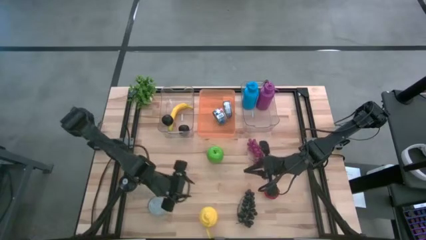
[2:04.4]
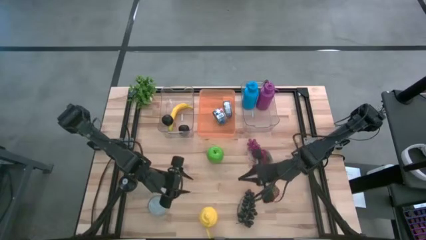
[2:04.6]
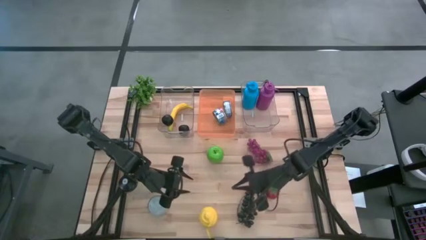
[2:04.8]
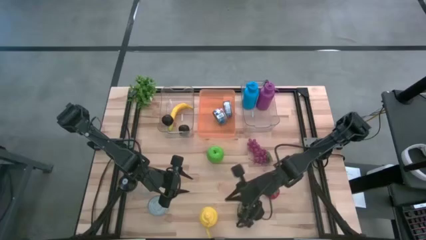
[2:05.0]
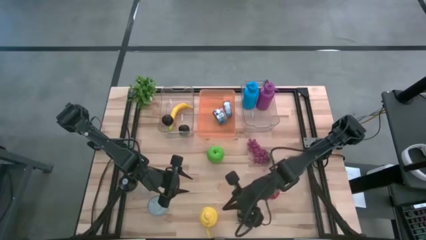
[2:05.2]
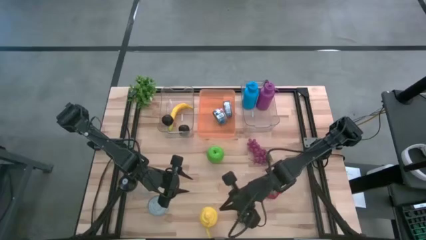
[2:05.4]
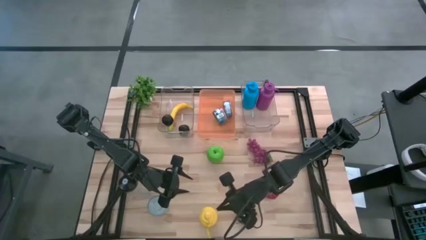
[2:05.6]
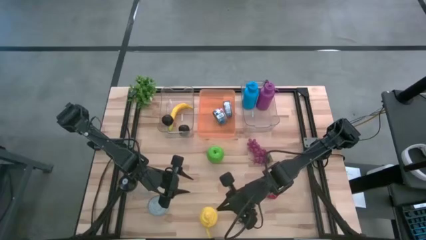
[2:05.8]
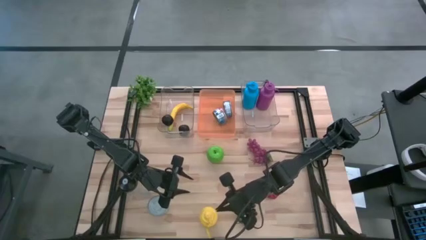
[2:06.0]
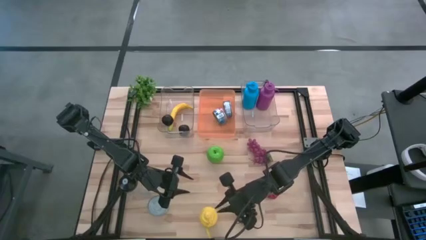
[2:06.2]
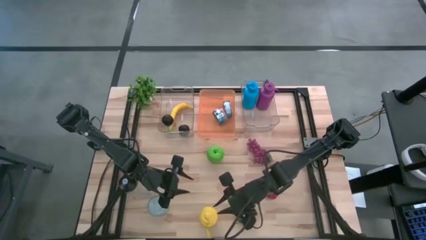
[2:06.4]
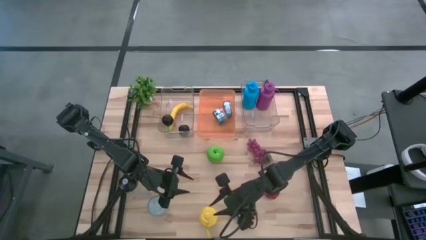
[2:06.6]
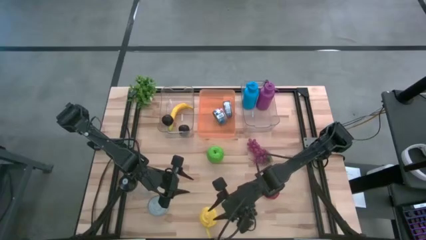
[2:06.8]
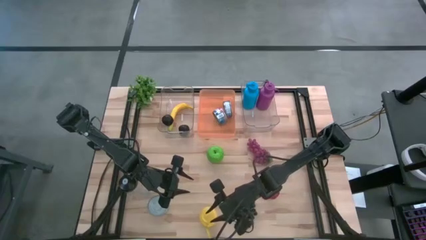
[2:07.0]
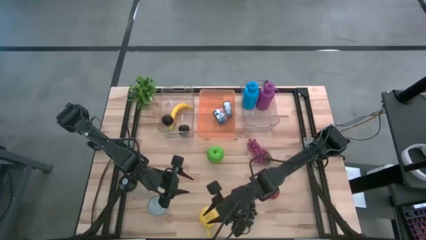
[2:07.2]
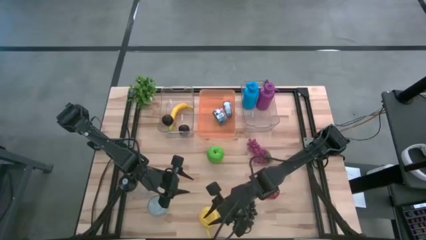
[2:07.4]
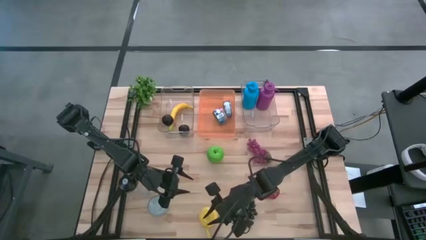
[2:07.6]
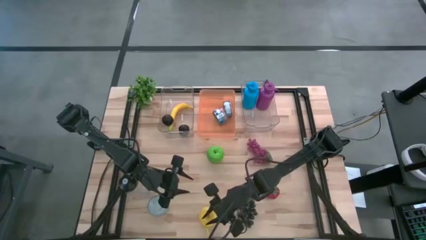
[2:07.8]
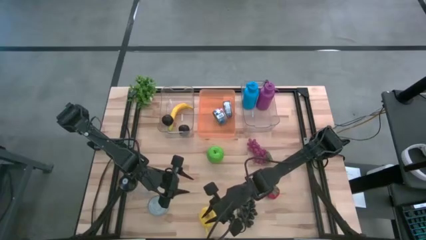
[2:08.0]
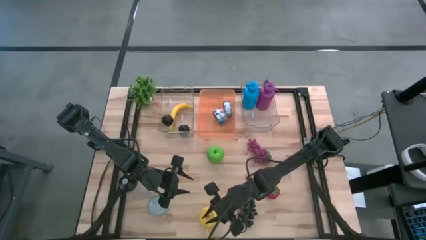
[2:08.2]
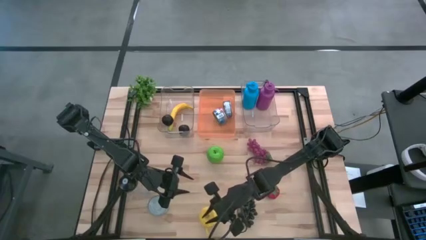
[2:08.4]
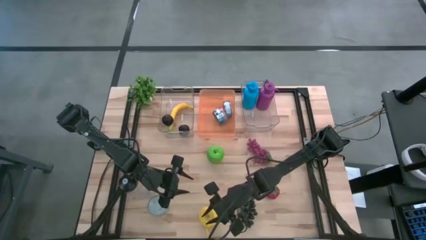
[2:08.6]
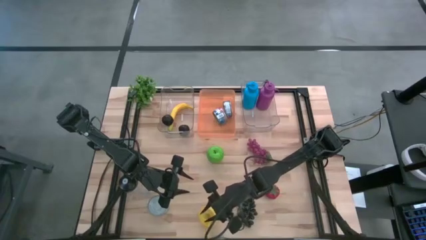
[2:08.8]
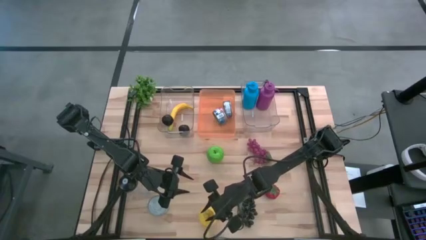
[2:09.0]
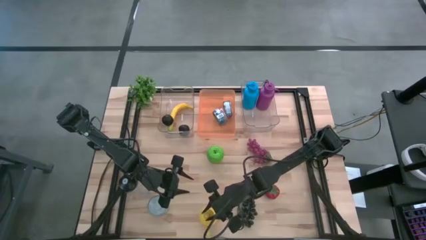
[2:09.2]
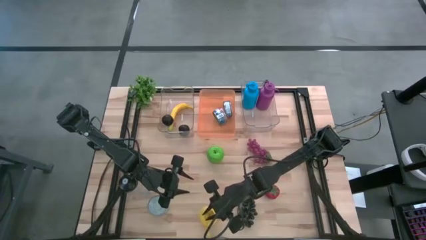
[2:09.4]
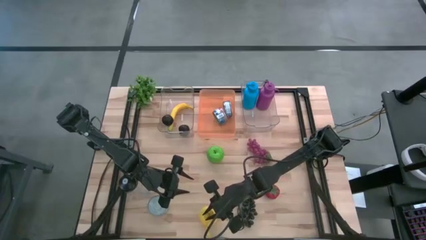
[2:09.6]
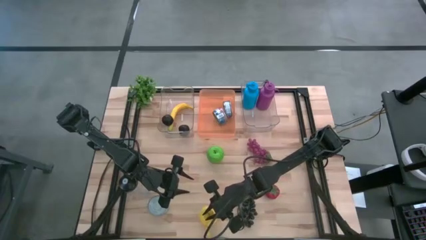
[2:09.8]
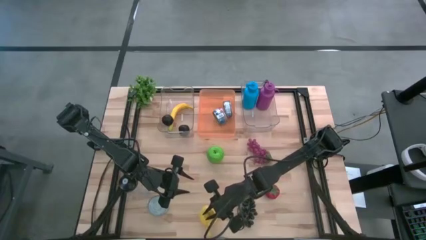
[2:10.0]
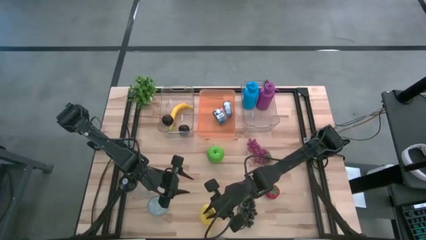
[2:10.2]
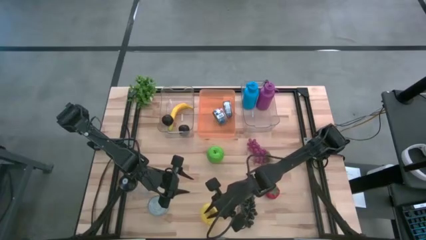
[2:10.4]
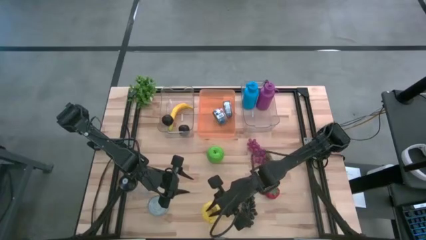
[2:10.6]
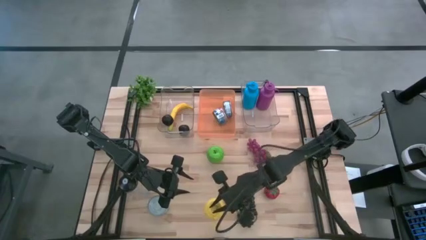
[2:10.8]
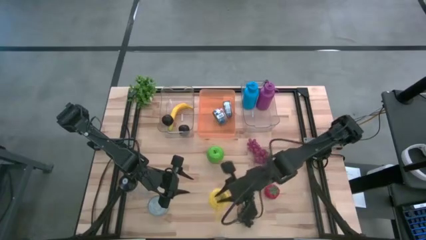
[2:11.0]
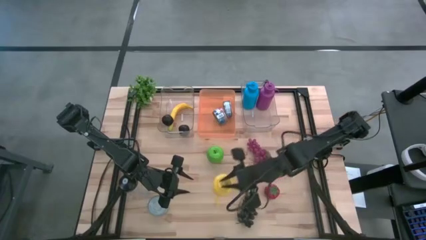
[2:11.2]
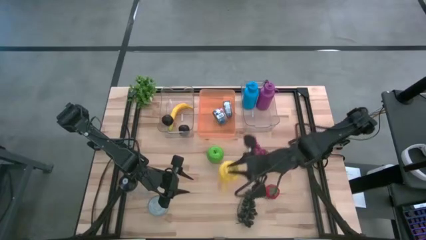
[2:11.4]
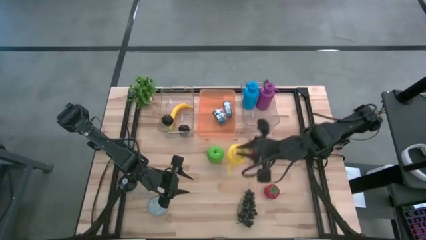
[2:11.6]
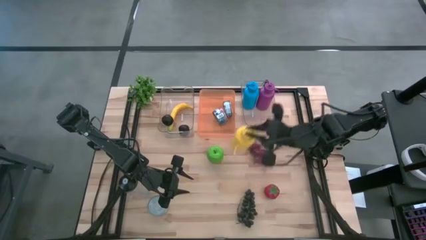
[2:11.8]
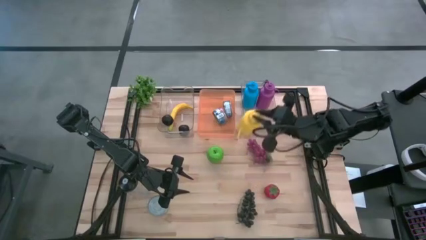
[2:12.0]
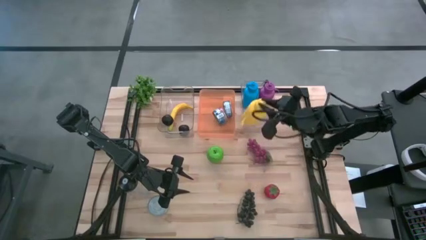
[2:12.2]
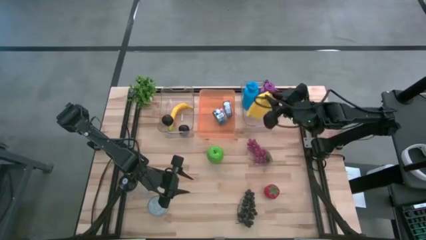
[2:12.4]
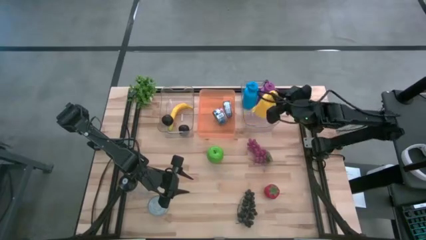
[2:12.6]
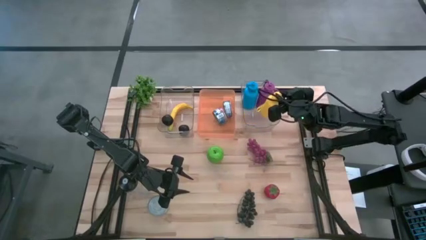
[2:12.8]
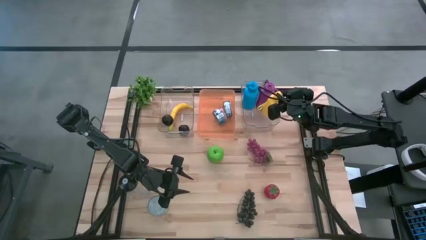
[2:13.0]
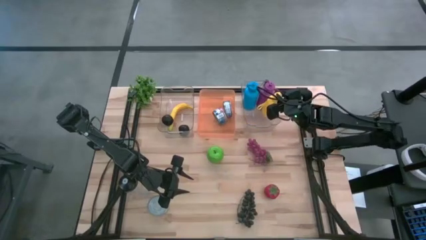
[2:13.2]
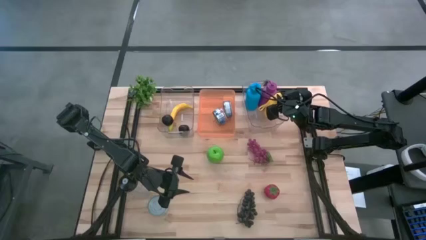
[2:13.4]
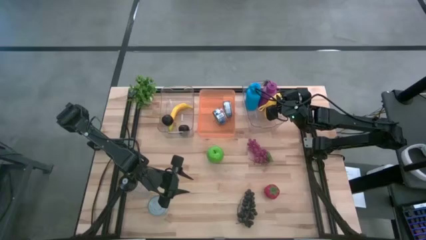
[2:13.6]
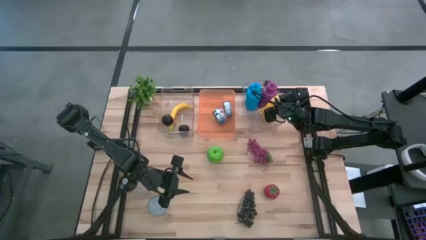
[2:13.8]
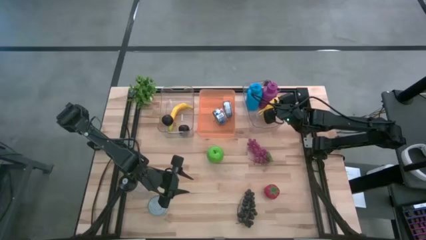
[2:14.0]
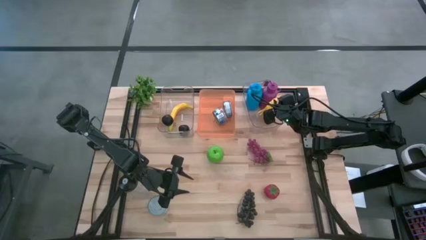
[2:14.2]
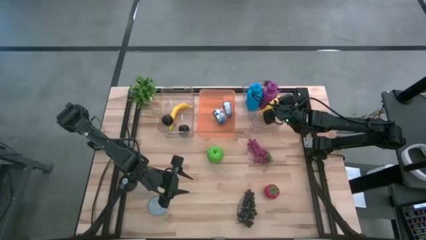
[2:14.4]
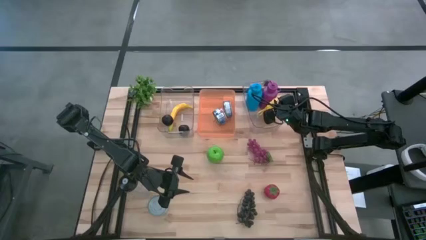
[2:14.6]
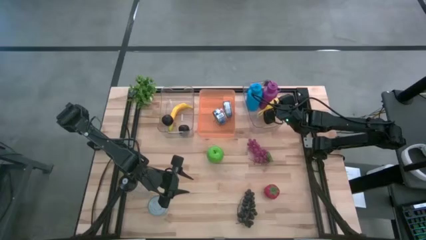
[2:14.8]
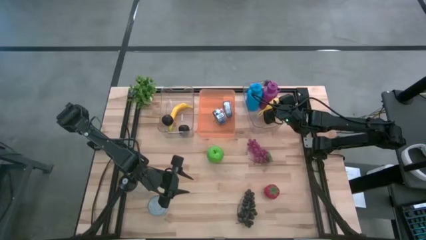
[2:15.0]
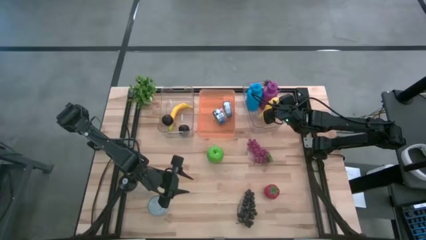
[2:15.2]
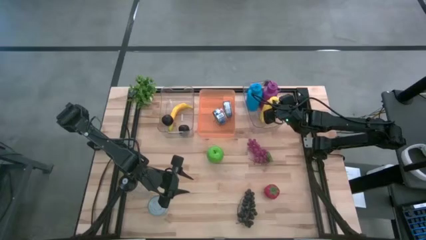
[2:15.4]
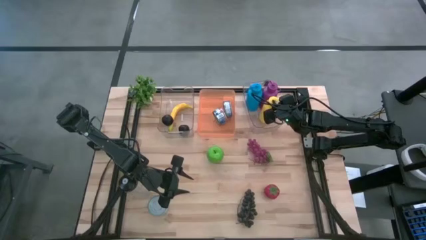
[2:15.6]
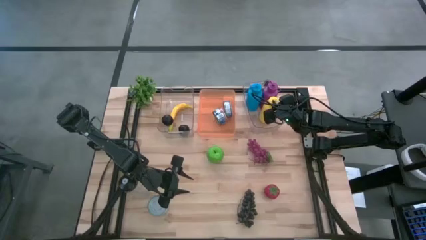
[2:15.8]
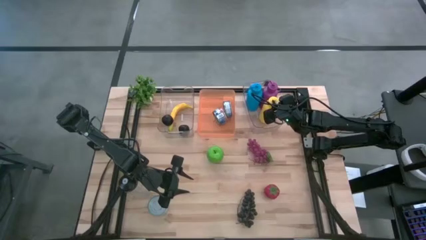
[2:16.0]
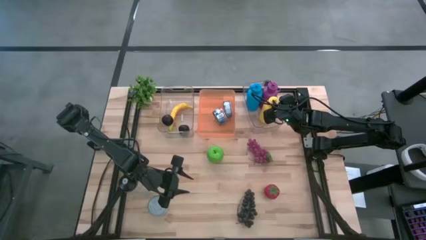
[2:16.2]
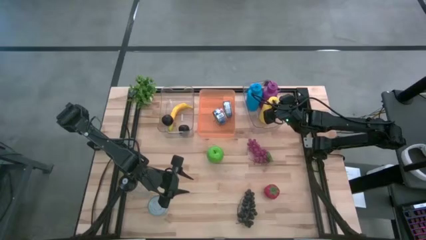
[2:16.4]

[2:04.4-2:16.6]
Task: Pick & Place Food Item
Put the yellow water bottle into the right transparent bin

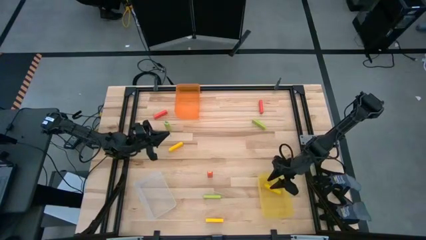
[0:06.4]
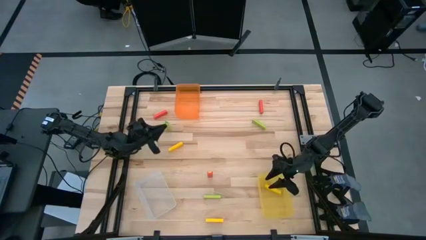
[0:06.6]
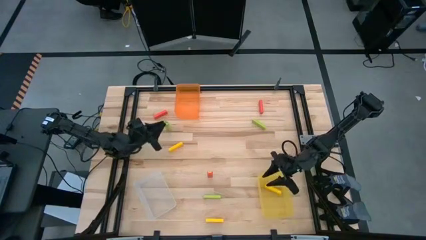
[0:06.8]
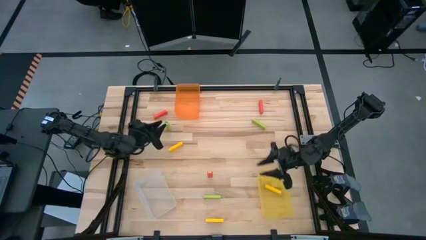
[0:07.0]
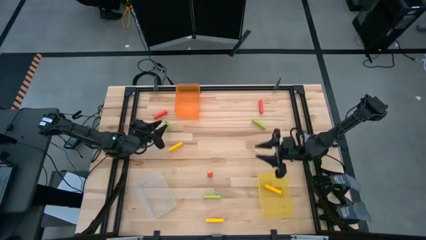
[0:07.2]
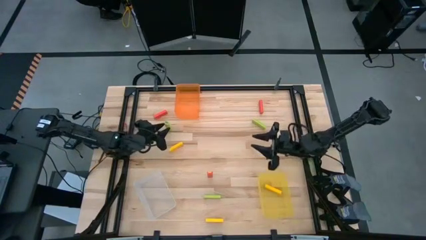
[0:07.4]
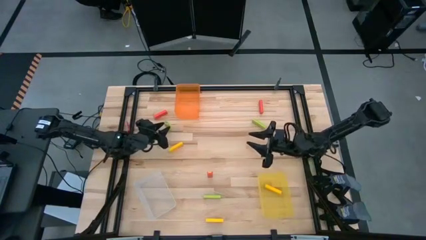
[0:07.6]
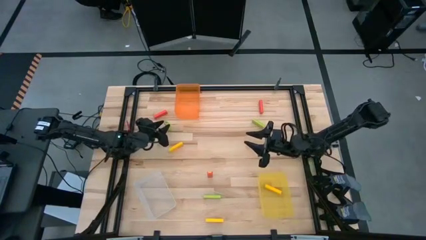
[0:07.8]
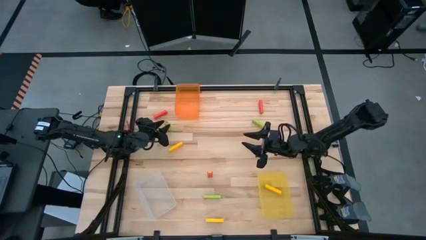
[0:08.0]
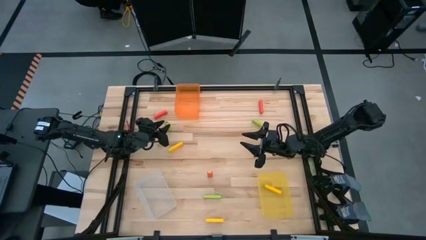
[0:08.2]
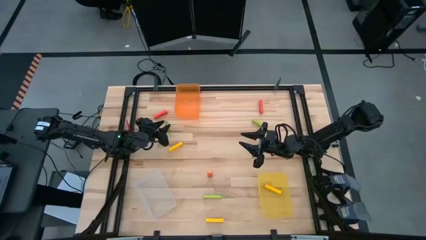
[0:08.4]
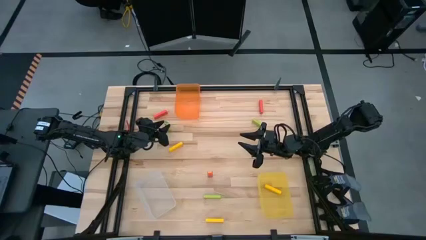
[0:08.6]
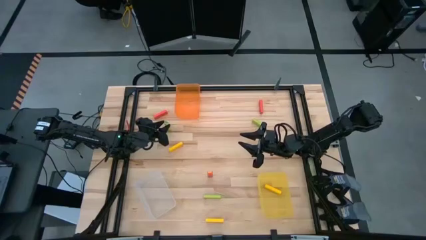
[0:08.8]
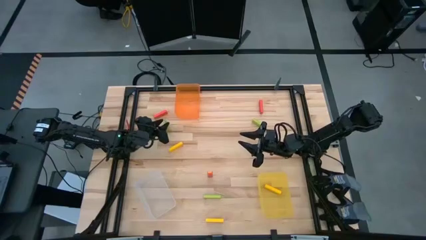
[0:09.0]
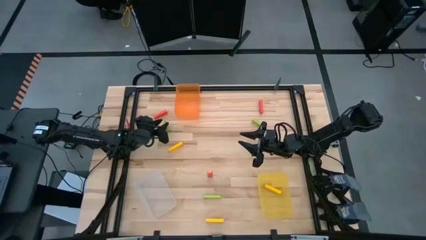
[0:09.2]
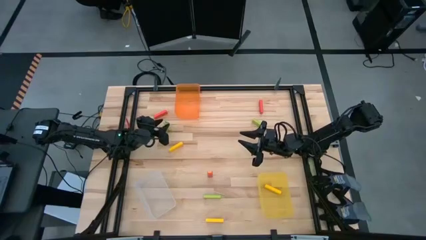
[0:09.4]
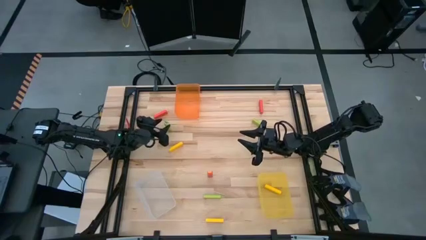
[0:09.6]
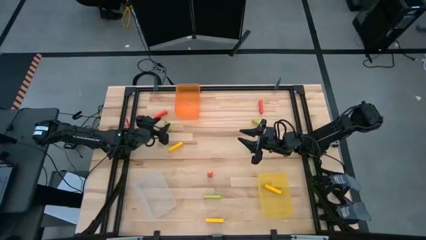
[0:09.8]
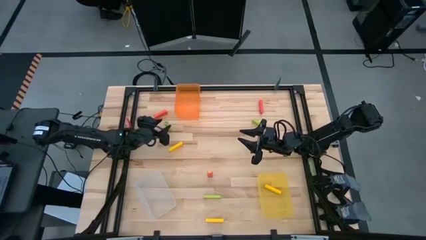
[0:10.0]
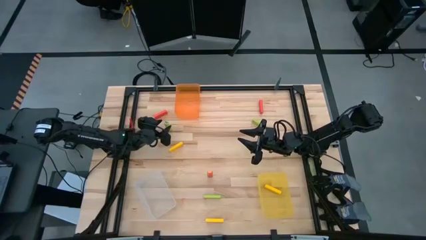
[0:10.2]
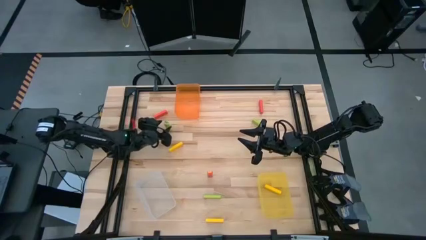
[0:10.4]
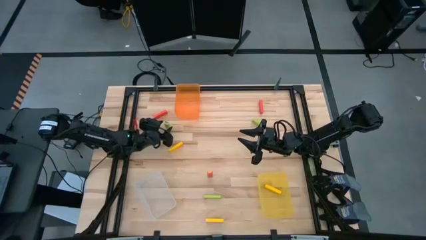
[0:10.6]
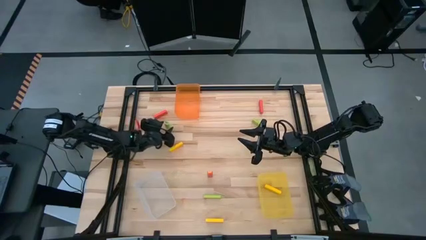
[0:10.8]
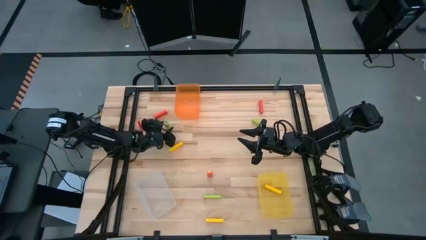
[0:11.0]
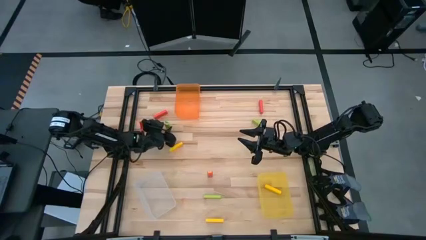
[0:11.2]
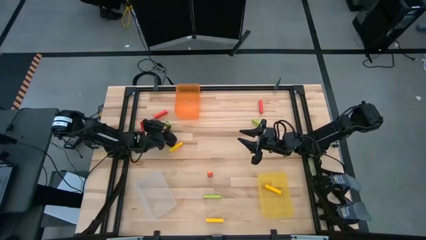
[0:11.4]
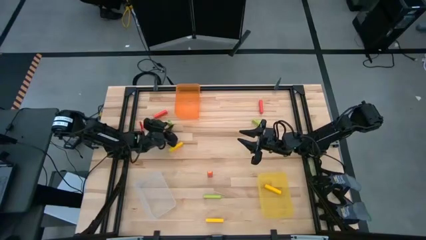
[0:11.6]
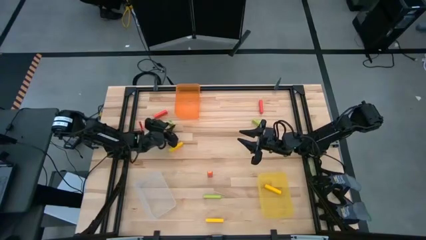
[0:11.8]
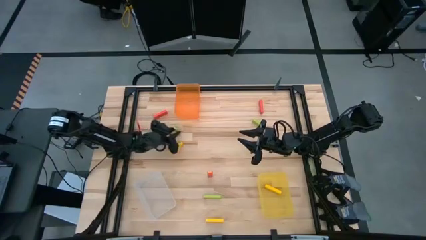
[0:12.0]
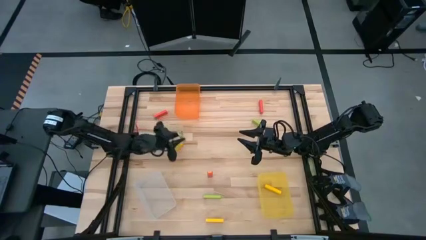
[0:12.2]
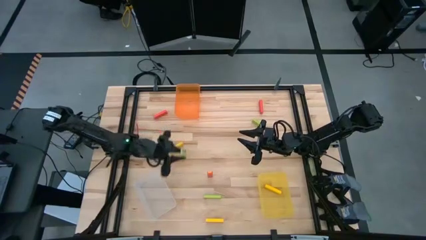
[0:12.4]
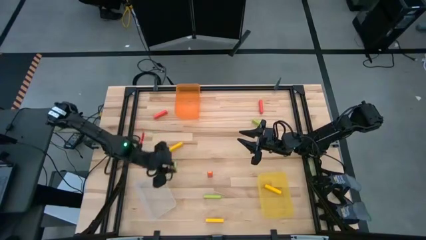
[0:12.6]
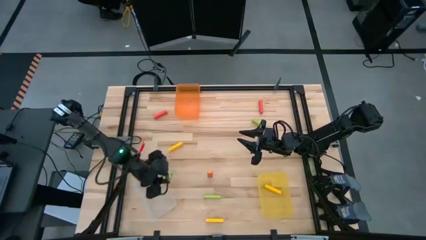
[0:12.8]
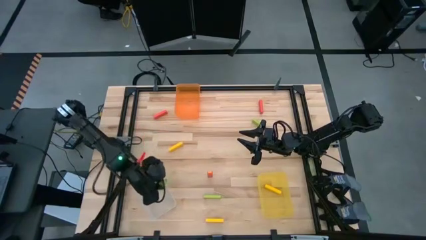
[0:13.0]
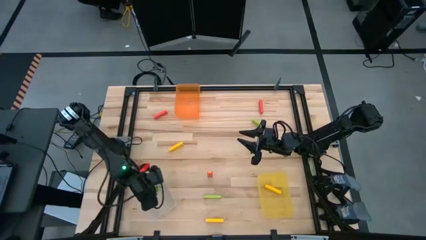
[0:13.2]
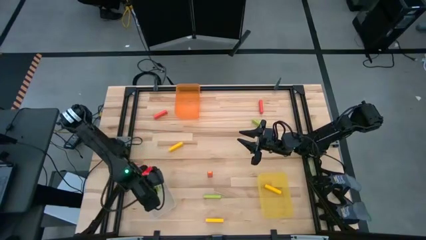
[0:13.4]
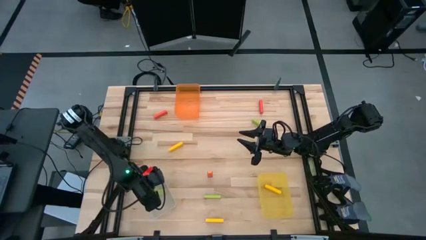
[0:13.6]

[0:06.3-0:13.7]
Task: Sort blocks
Put the left green block into the transparent bin
